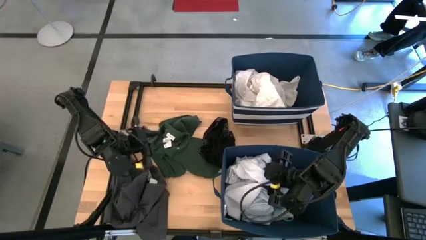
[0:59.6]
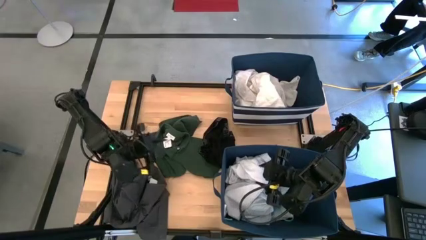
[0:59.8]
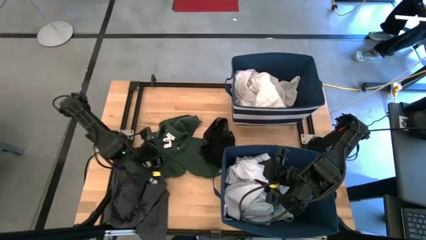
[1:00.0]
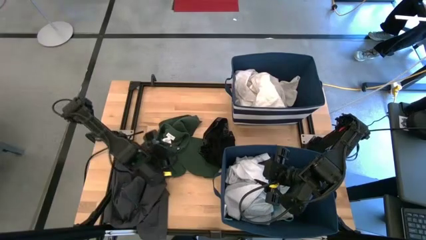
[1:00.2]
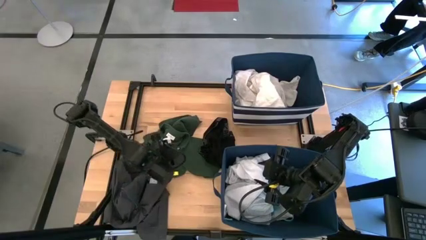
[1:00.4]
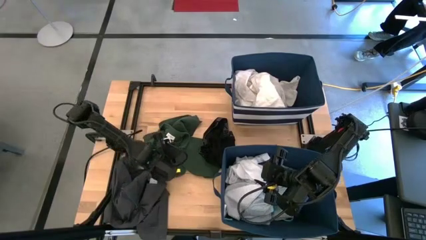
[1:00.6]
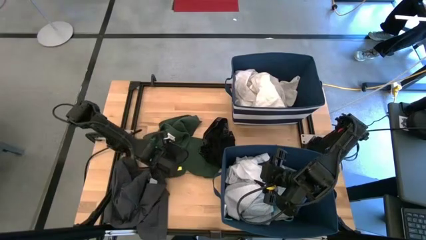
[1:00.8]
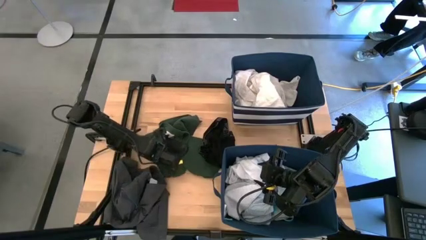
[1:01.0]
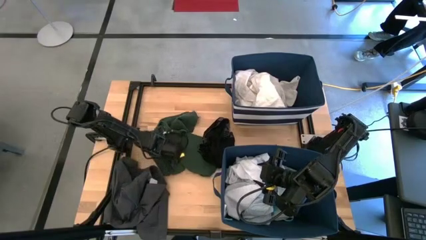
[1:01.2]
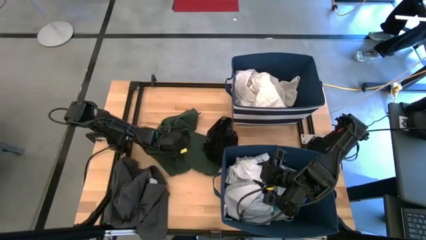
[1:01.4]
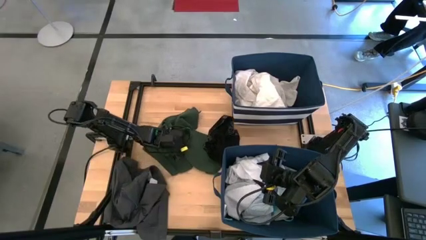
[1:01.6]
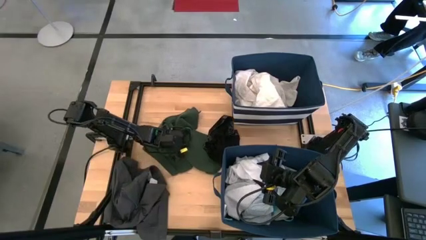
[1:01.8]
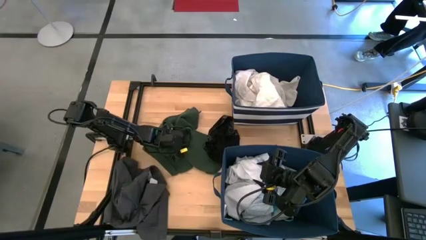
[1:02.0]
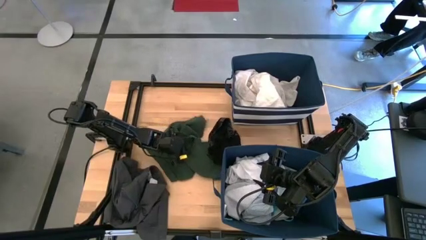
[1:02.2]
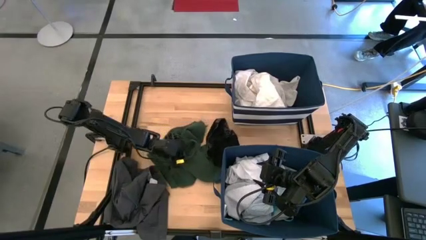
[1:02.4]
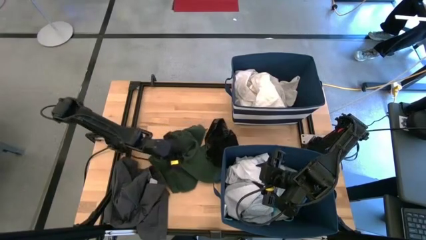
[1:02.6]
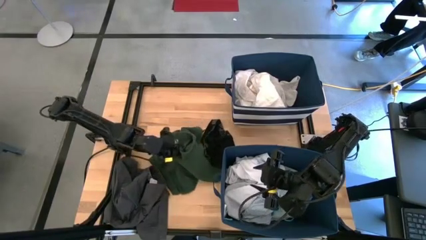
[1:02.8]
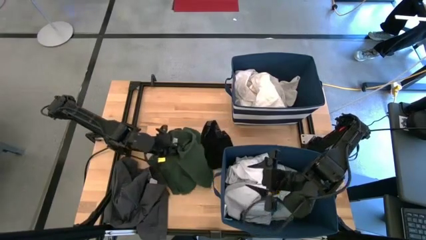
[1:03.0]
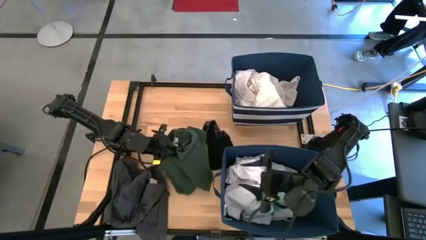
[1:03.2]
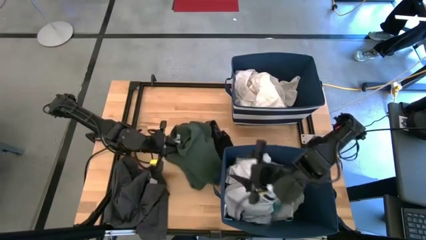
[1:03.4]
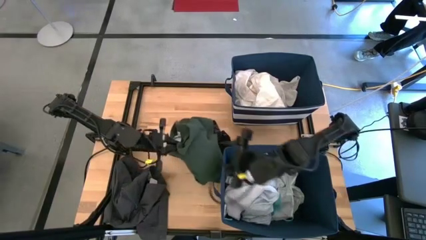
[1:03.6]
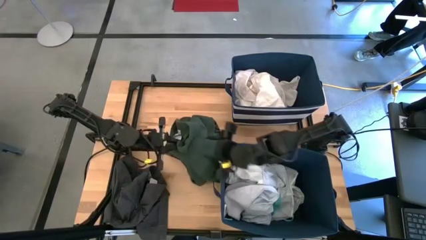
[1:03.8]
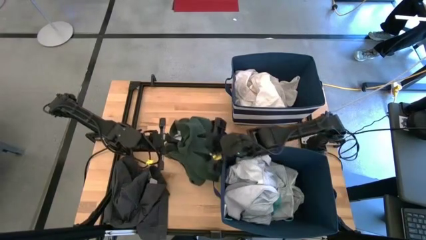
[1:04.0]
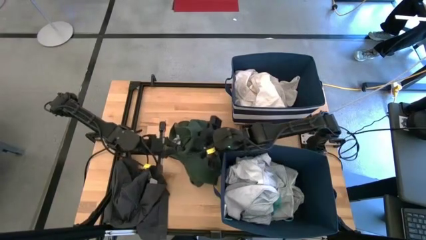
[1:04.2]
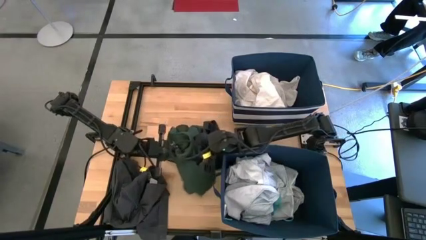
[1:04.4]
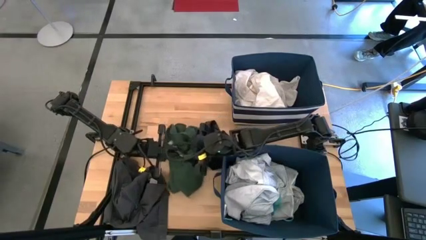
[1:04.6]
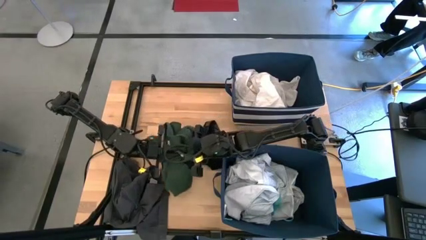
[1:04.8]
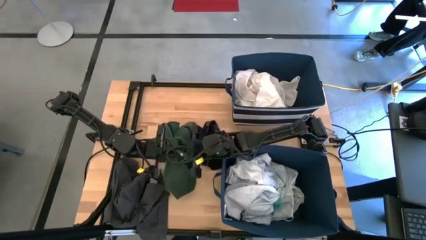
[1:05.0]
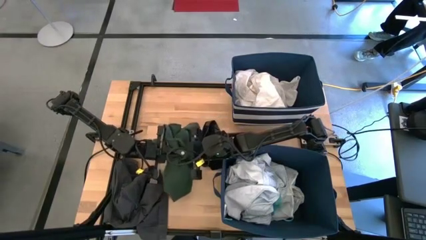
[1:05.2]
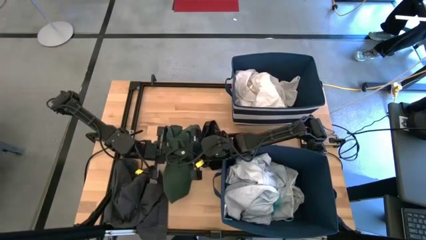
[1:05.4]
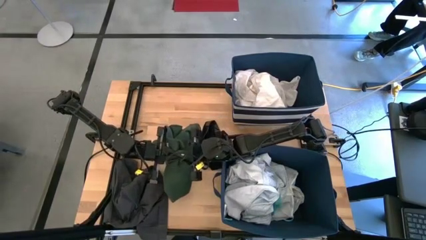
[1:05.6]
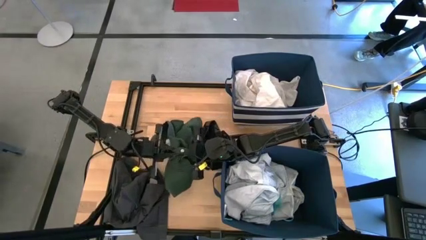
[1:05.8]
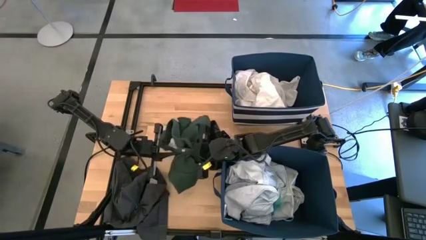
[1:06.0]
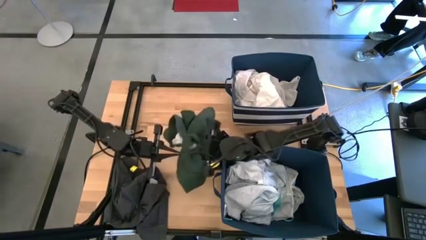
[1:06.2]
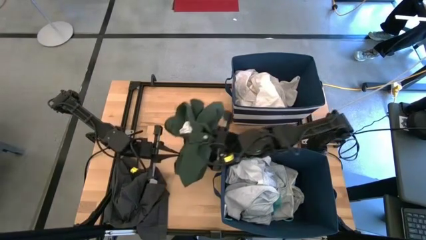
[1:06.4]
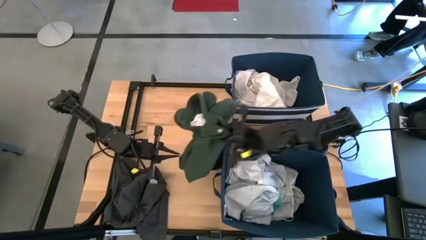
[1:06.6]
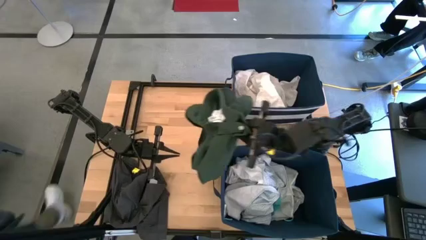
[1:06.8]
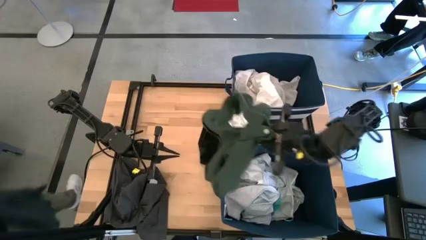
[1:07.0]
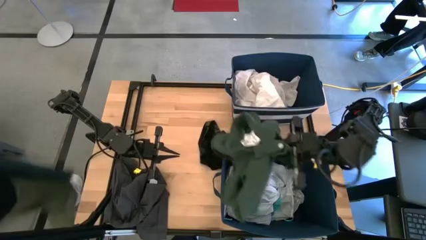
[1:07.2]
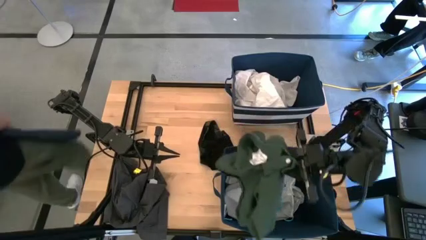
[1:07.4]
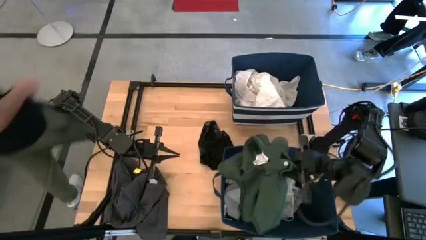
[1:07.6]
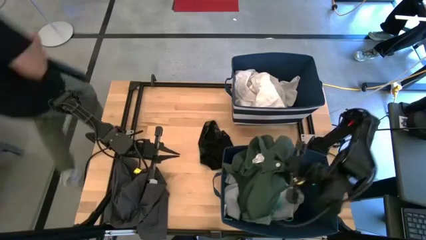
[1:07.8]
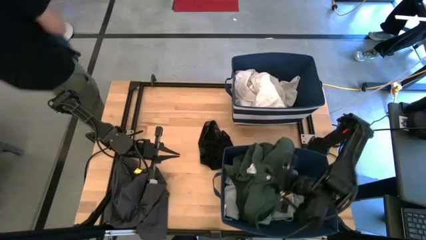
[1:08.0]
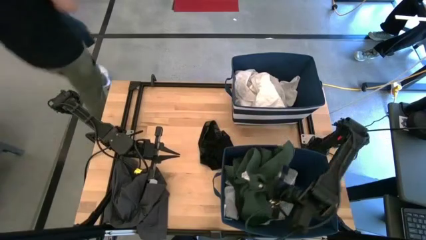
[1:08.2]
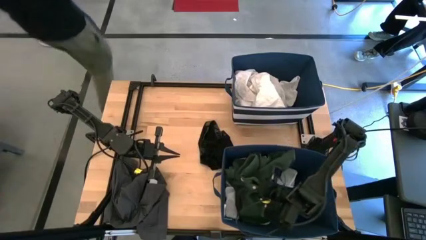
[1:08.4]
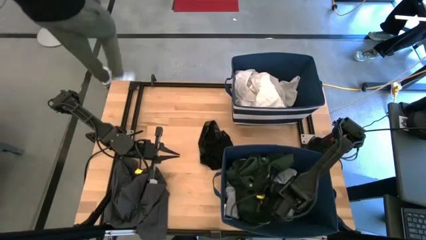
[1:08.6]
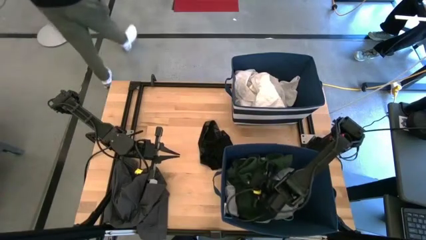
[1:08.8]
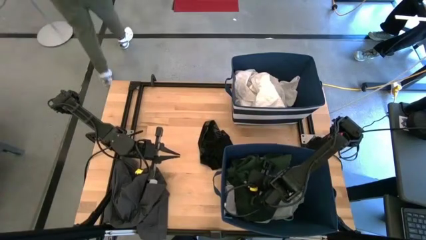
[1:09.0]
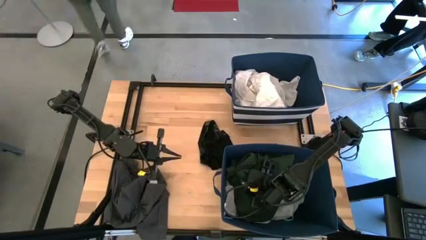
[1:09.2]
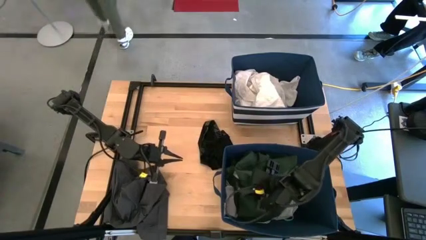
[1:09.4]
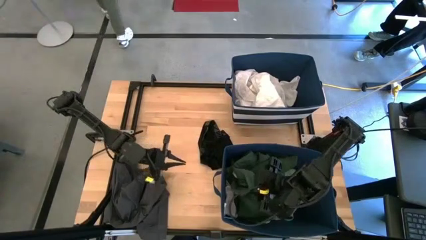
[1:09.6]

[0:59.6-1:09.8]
Task: Sort clothes
Put the green polo shirt into the bottom blue bin

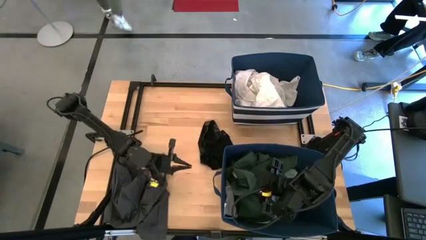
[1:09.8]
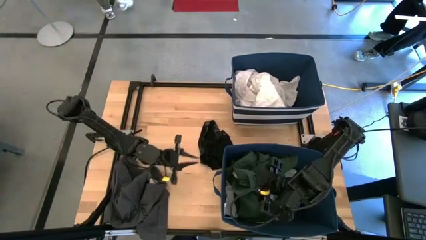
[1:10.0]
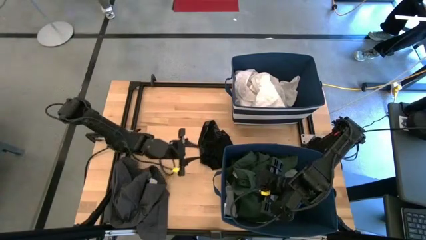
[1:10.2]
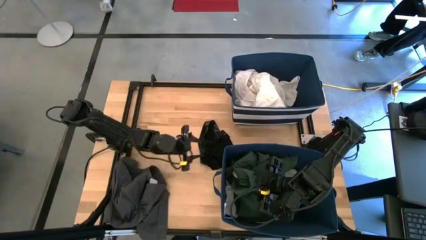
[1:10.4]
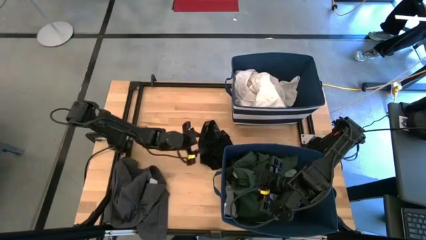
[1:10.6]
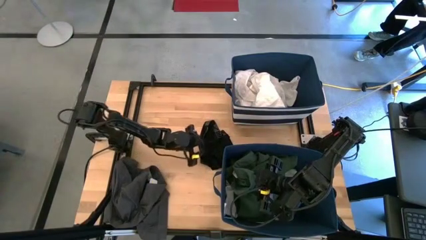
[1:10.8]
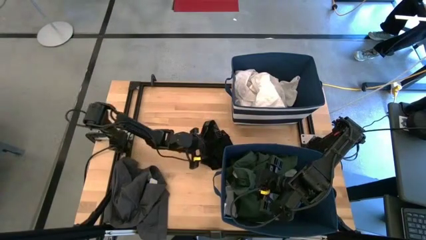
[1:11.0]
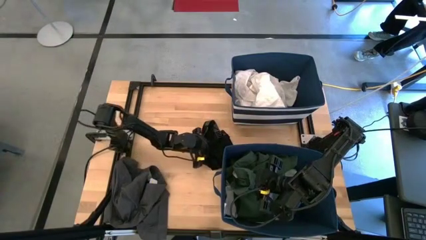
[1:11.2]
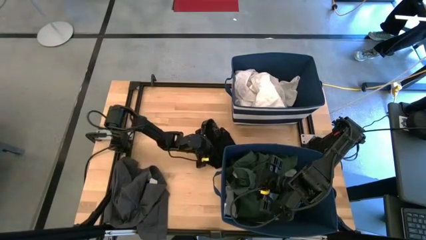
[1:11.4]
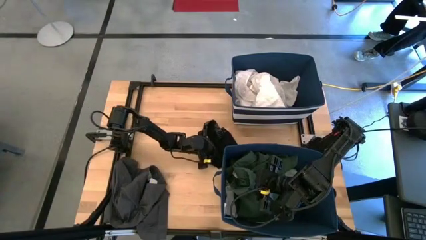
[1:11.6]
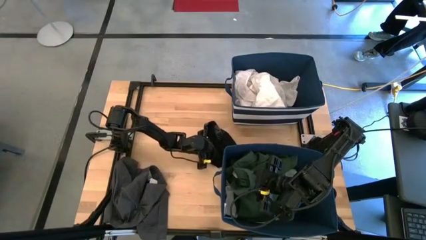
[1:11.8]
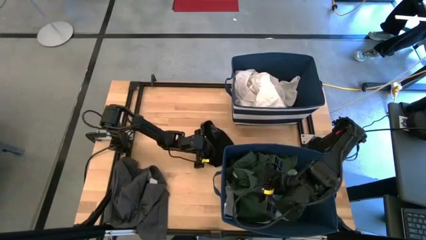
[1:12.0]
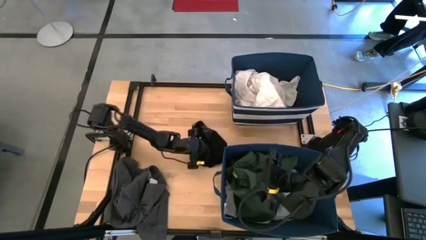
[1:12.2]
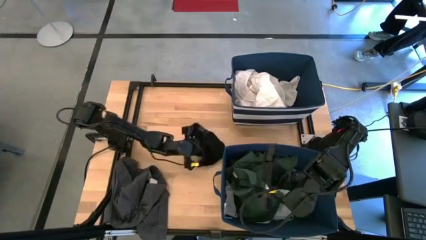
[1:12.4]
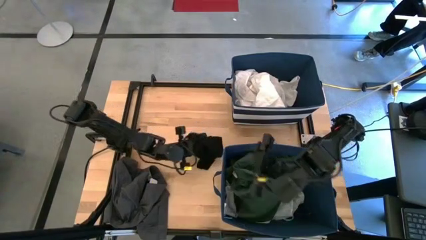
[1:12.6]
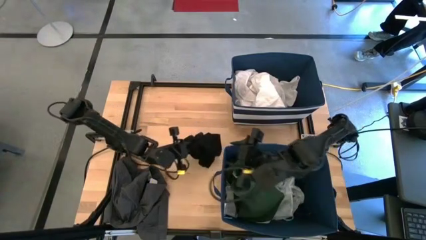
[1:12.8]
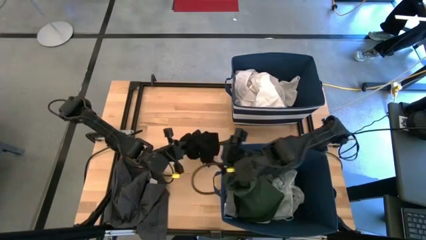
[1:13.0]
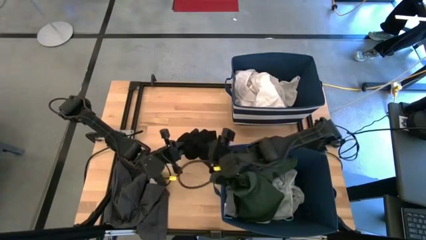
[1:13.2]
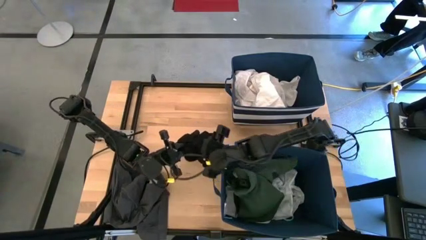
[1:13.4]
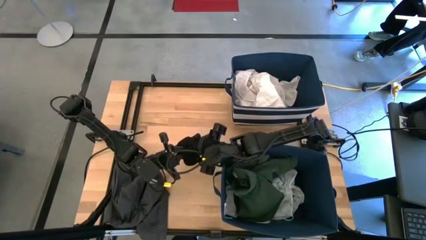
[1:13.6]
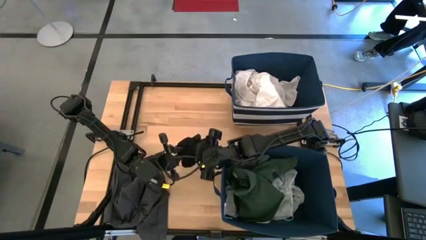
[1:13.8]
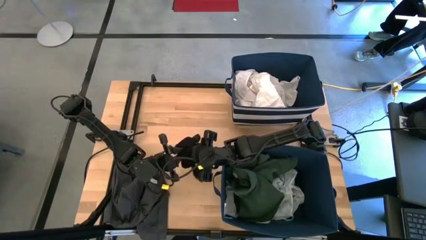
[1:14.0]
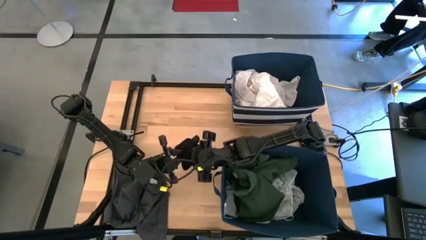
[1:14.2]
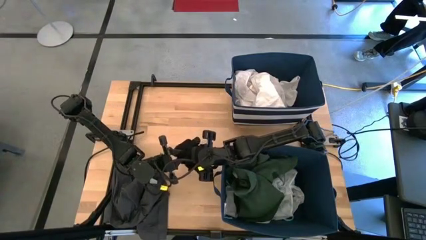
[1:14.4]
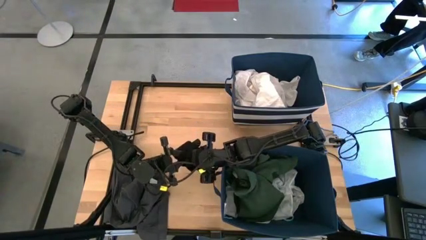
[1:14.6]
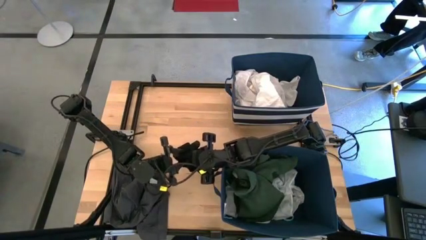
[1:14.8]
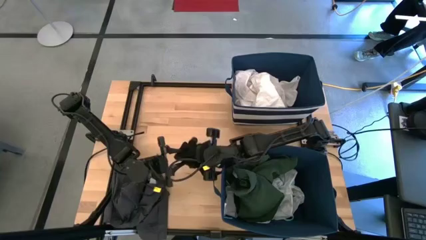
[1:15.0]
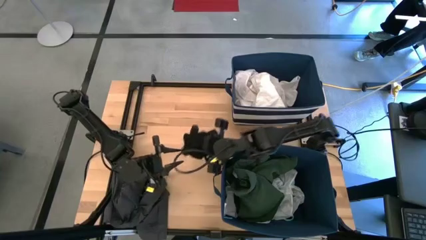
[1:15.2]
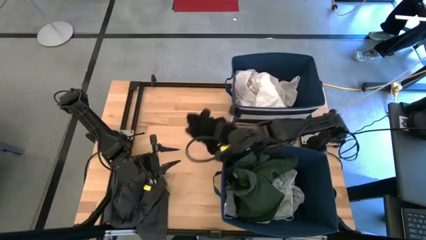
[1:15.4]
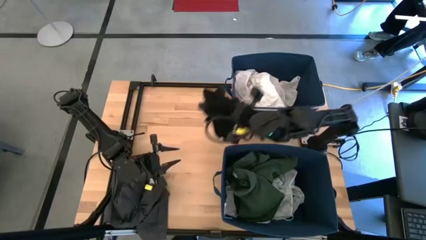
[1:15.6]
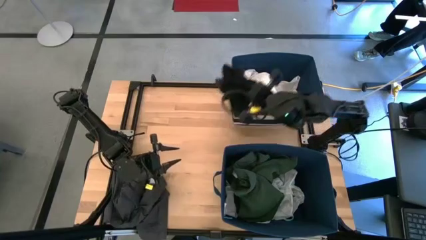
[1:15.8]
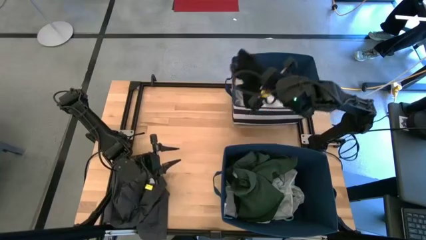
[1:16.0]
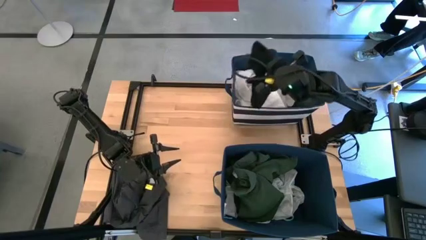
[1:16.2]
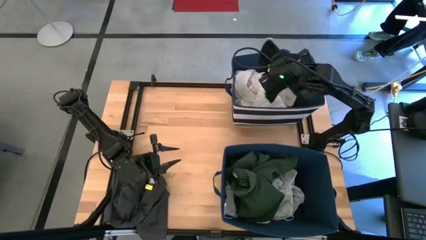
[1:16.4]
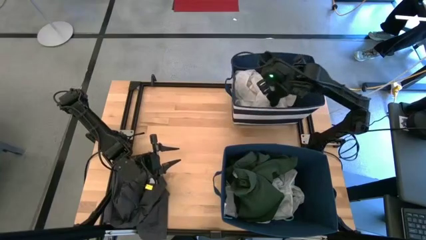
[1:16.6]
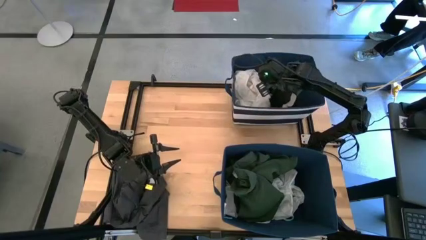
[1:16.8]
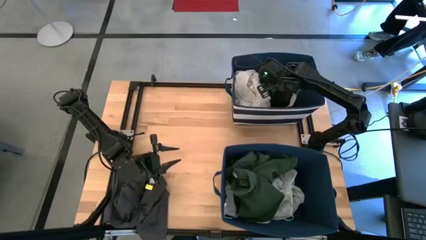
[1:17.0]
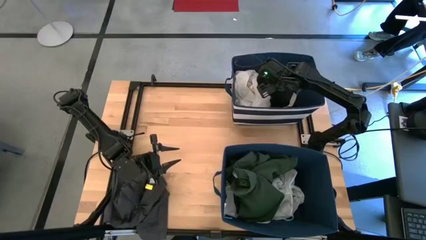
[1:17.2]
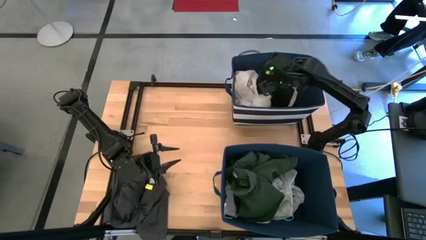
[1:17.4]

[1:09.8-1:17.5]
Put the black boxers into the top blue bin
